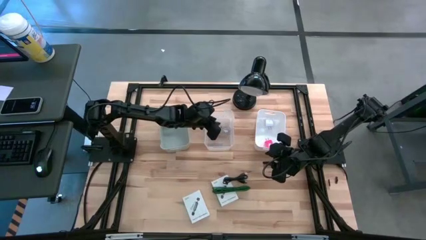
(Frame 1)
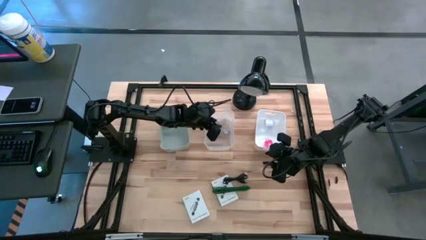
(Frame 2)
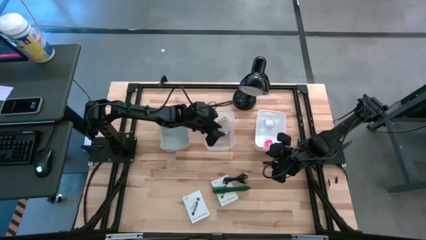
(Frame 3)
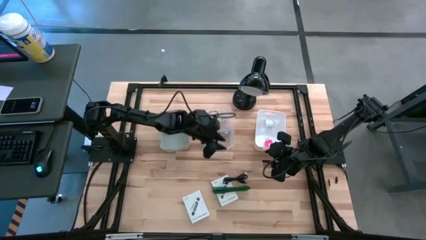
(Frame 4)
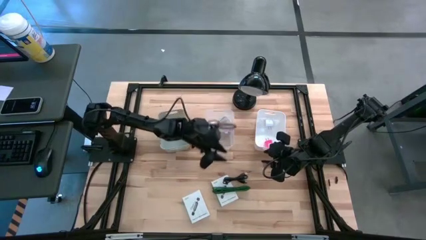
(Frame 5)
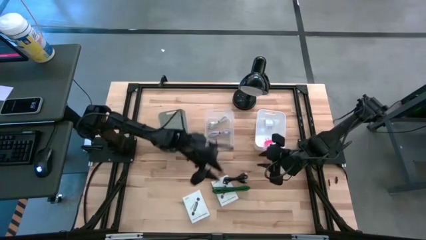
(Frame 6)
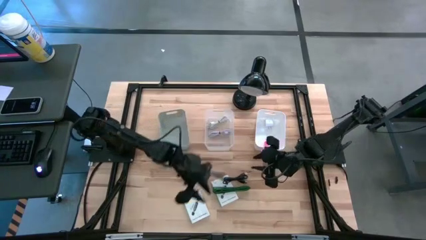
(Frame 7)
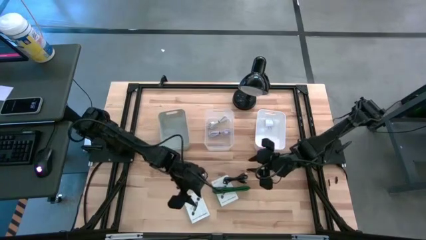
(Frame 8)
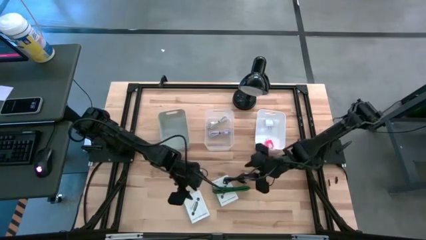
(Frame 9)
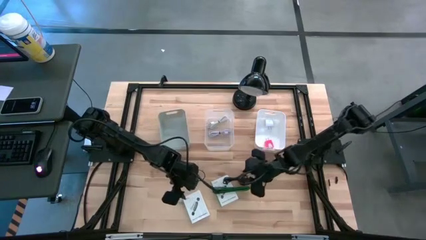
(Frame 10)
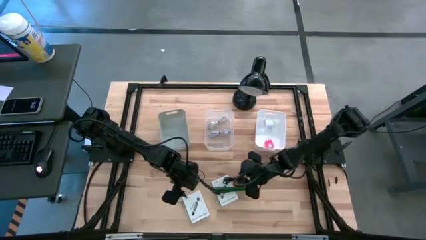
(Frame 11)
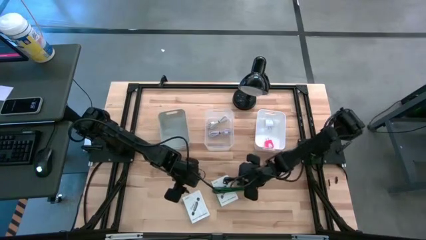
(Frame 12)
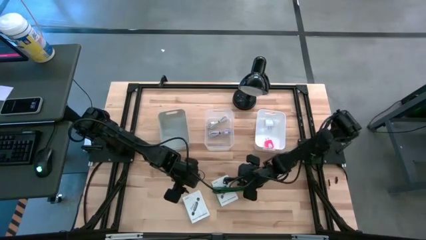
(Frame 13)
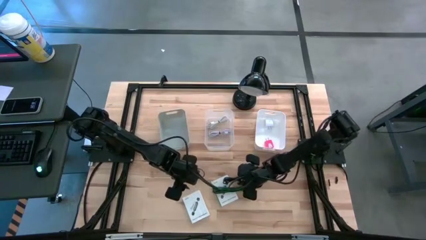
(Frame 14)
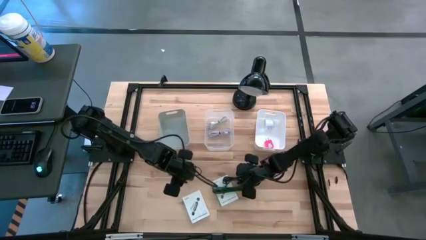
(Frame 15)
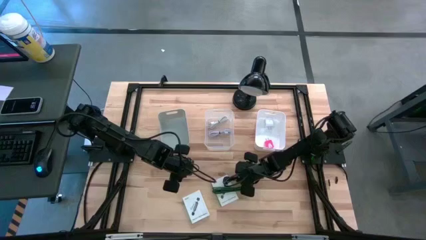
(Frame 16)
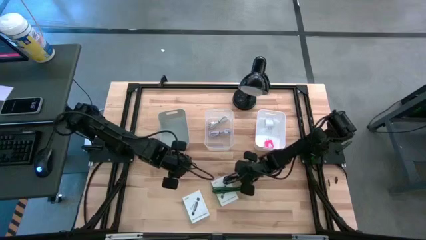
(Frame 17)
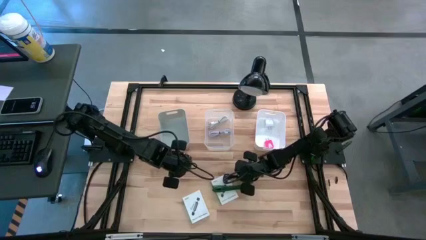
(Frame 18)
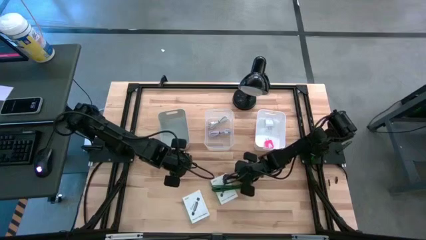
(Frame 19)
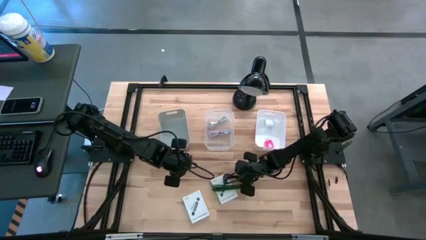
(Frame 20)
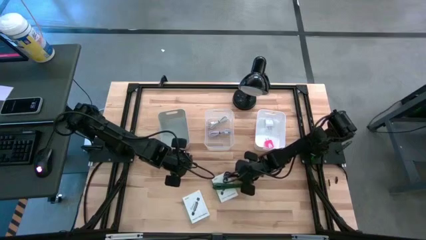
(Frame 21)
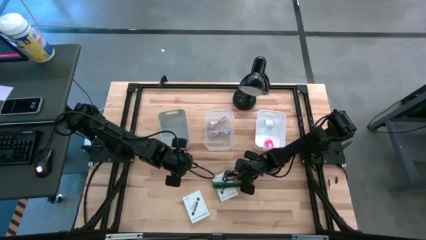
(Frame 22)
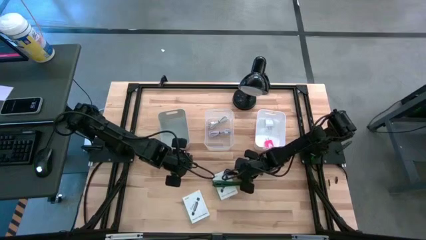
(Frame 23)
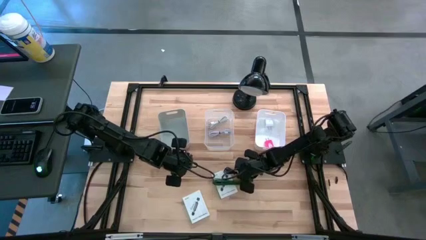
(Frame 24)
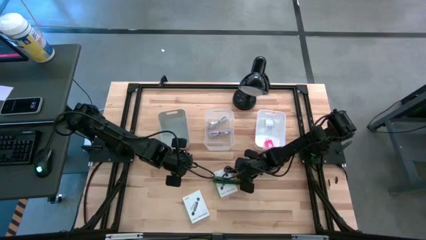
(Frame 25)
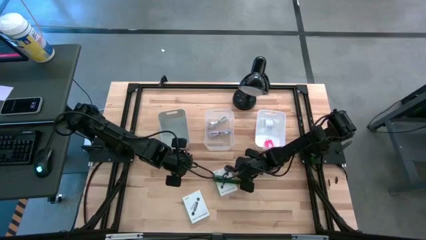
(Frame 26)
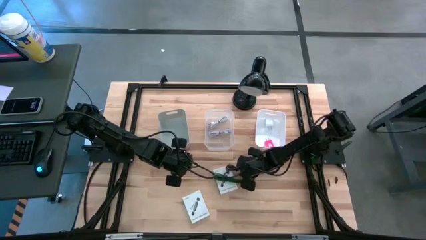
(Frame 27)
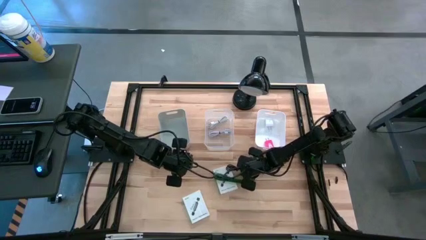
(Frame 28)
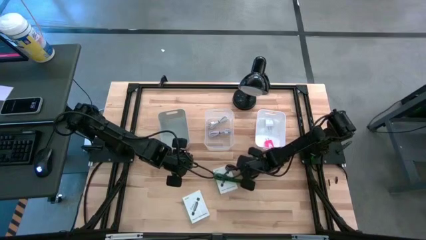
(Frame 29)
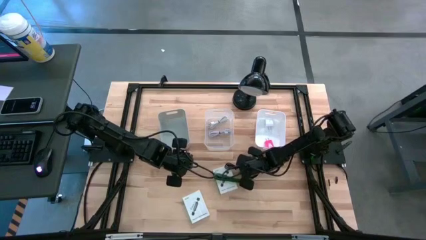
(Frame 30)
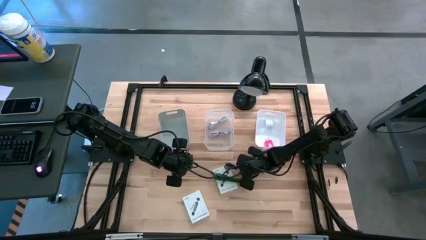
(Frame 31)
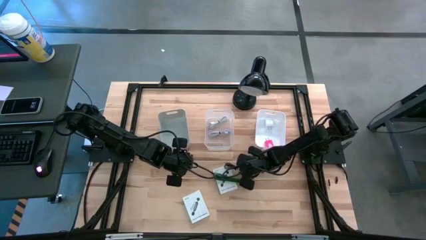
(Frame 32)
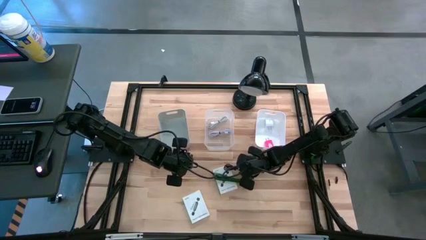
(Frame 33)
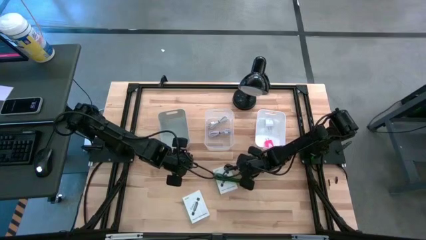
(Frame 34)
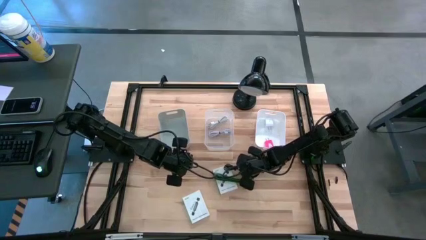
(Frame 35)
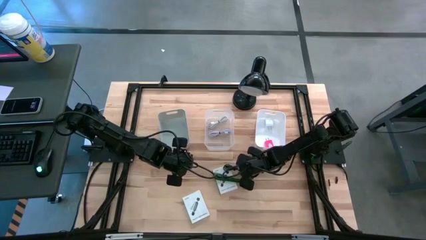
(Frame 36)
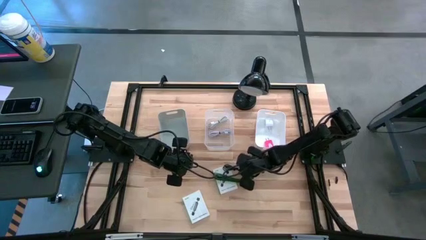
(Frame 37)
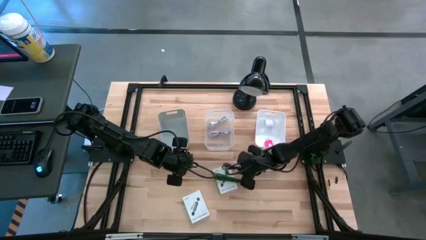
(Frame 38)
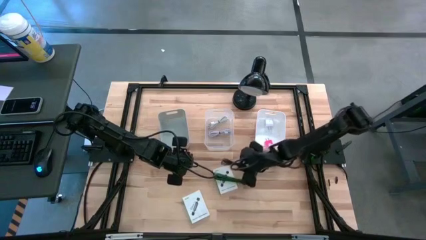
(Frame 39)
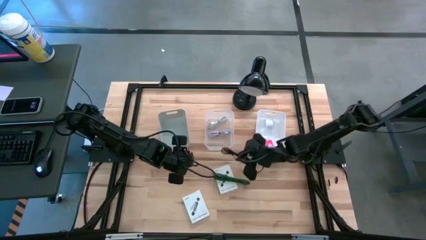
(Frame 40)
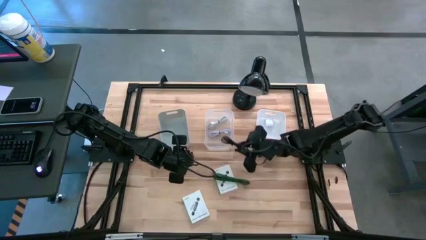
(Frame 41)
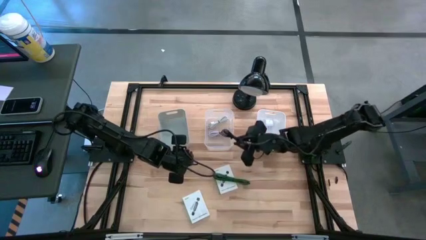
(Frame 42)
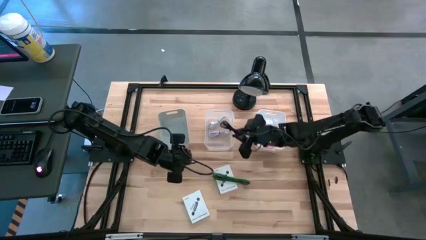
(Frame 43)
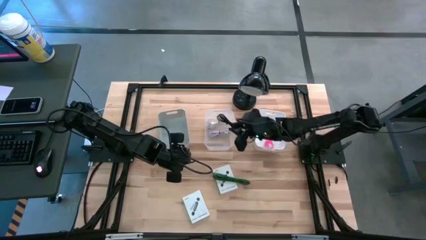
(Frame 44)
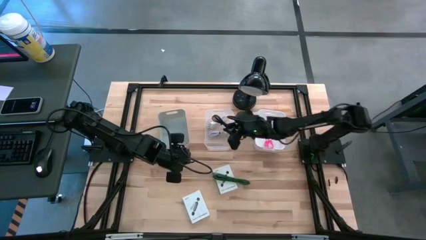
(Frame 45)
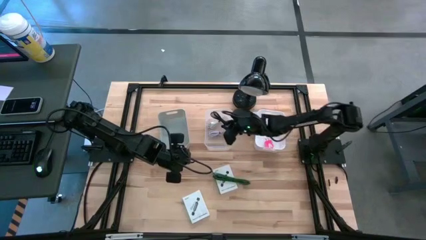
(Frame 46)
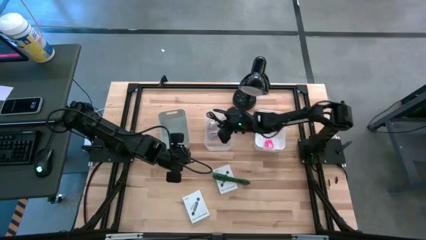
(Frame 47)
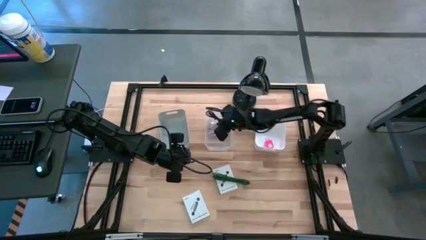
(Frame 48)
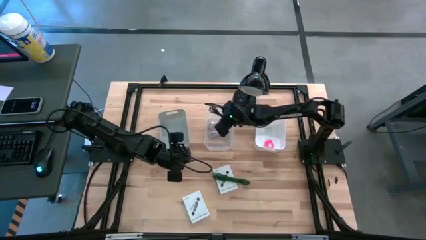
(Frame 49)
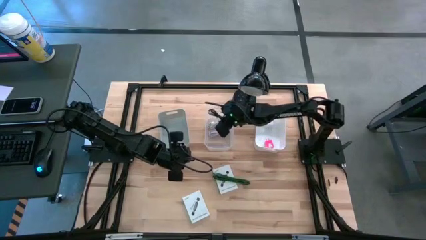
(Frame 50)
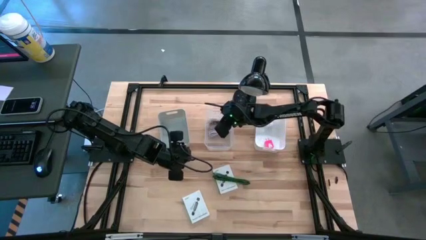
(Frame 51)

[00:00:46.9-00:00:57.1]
Task: Pick and place items into bin
Put the black charger cable into the transparent bin

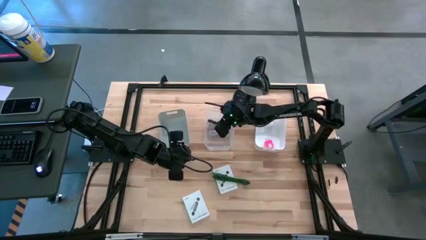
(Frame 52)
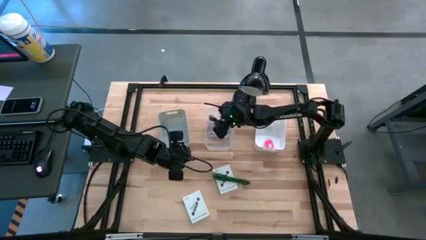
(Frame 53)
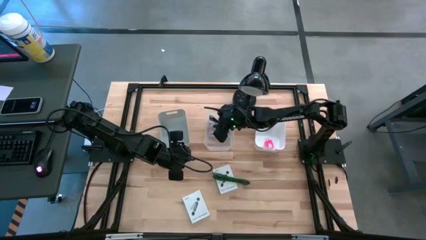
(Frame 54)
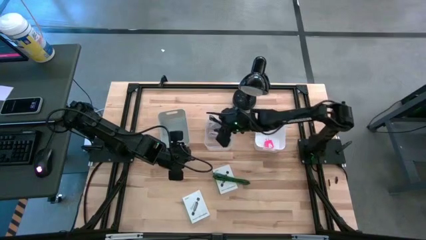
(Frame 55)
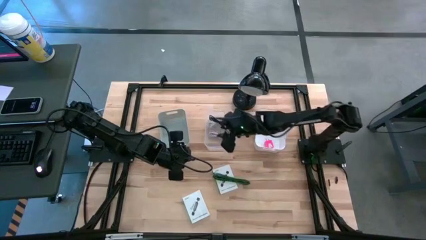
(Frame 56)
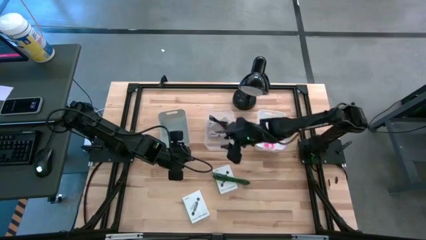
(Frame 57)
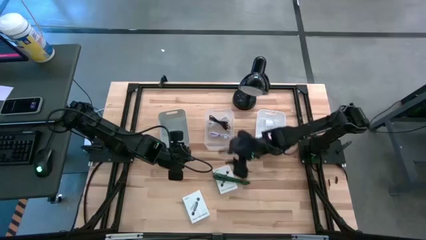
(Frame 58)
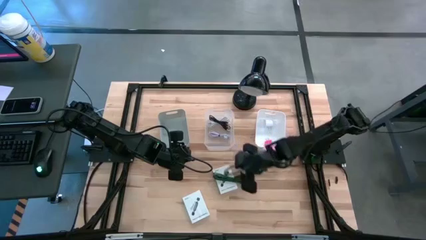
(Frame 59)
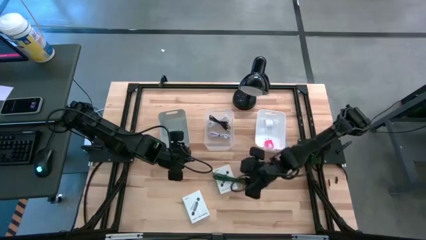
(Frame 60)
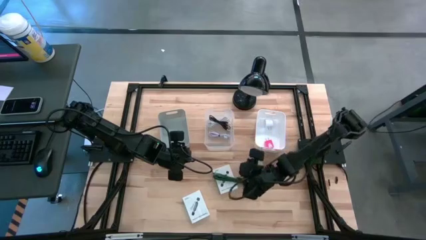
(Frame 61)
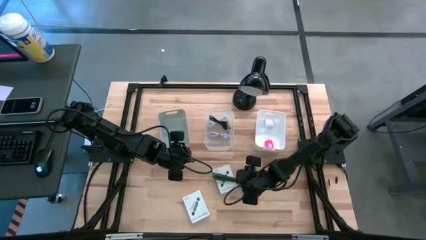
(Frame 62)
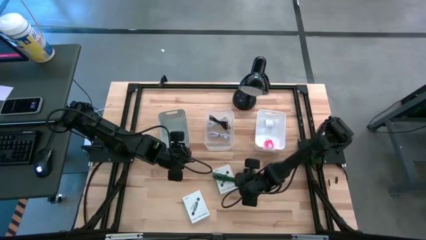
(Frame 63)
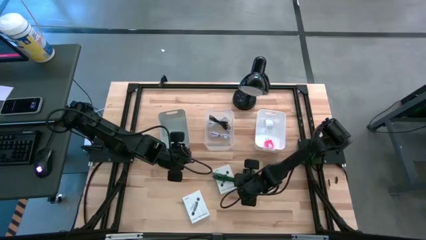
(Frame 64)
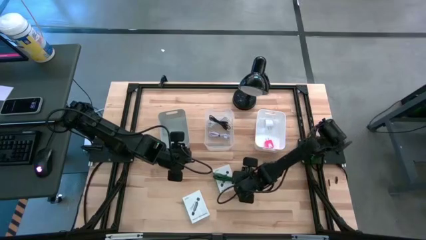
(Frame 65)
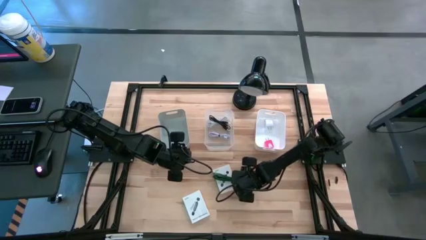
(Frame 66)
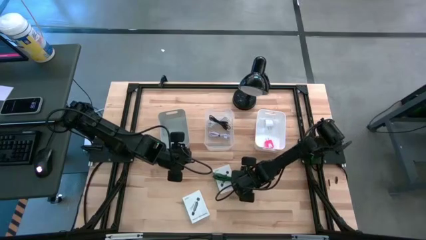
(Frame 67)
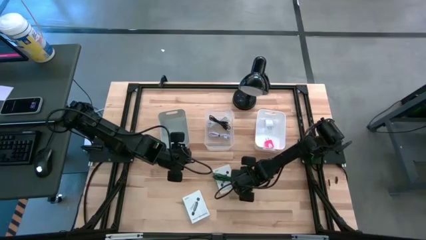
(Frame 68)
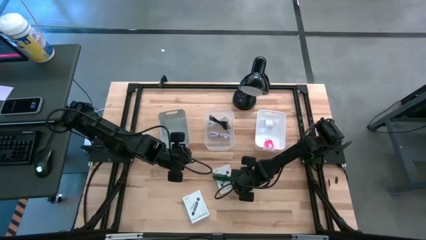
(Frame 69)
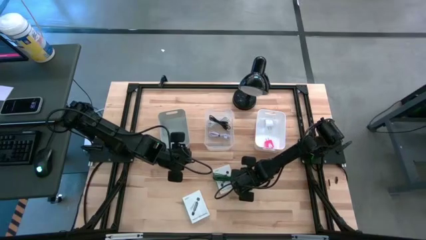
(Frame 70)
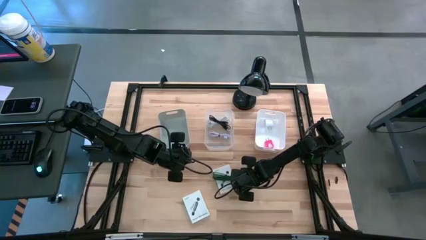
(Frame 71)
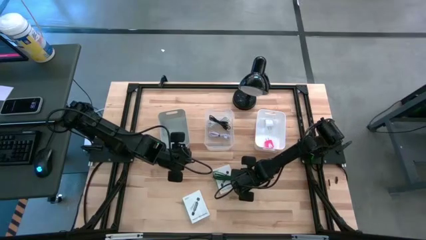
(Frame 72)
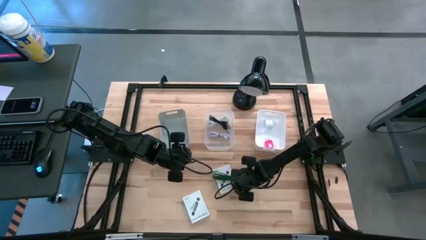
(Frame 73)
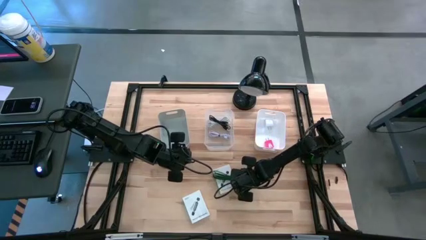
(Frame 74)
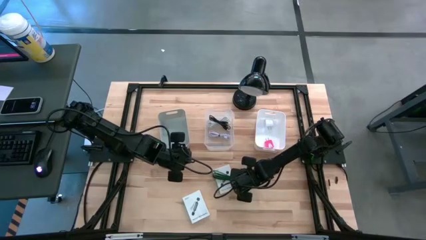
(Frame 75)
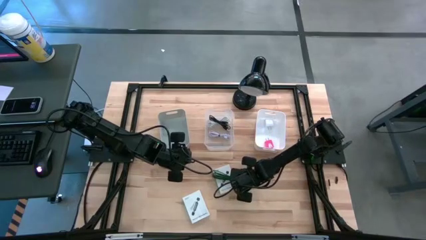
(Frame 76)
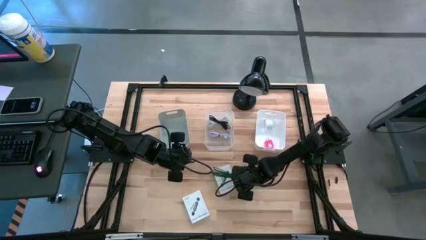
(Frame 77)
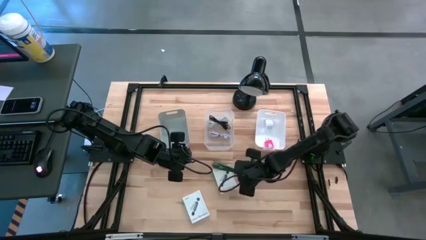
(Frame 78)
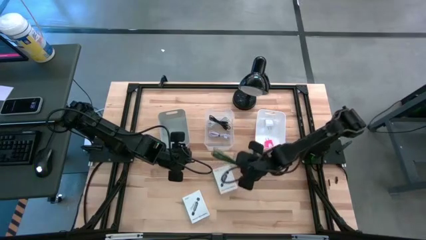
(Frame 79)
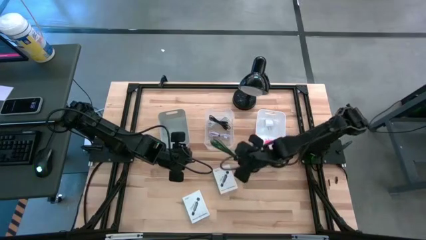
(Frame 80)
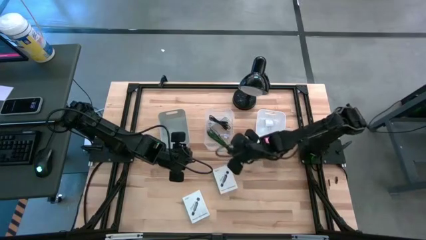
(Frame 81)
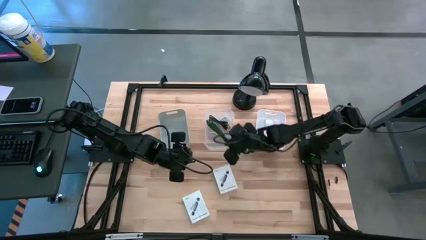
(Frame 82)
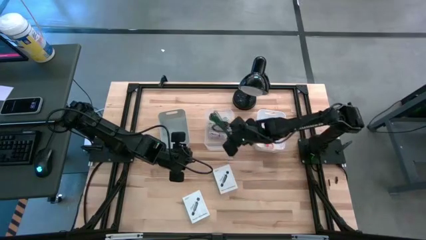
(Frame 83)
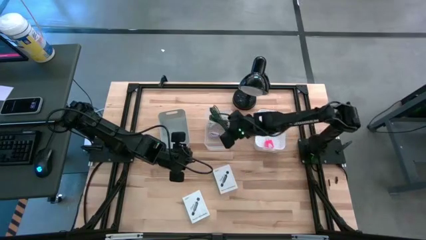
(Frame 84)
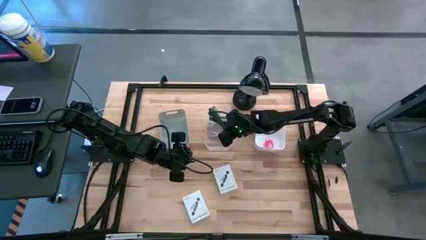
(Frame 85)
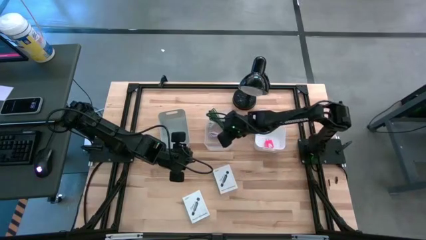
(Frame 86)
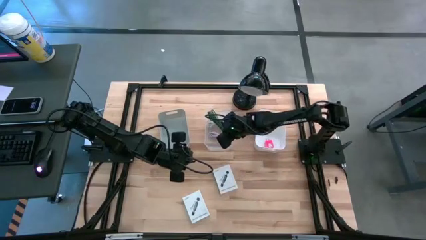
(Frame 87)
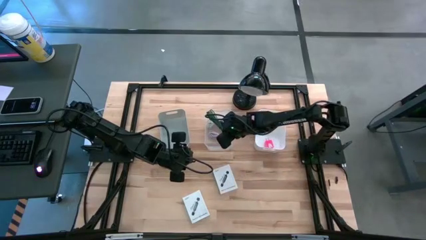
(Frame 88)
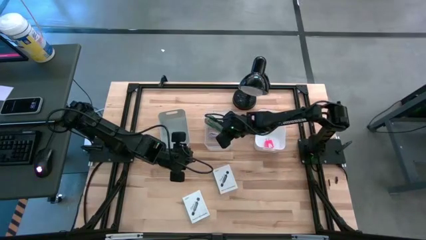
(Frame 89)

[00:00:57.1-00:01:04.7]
Put the green charger cable into the transparent bin
